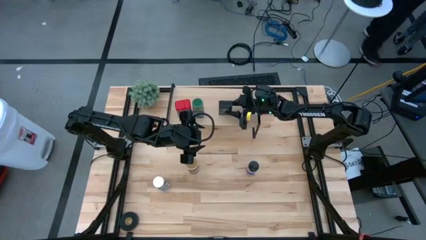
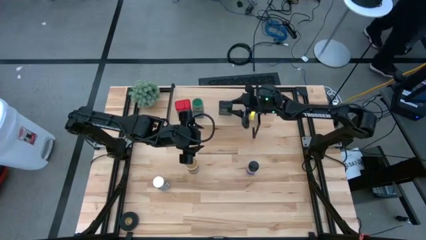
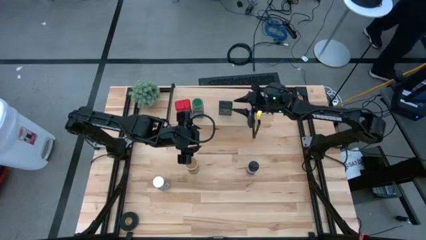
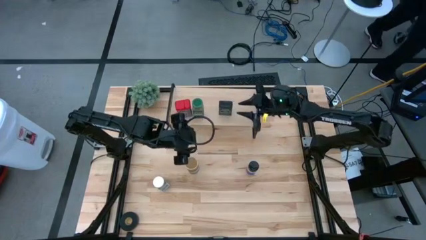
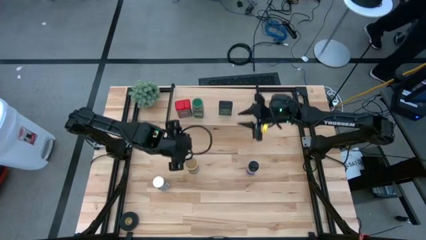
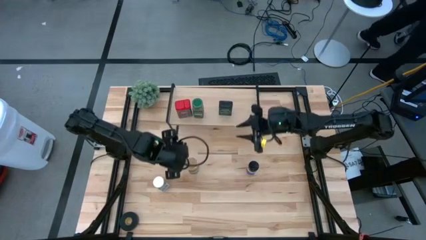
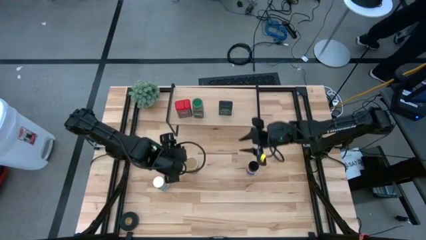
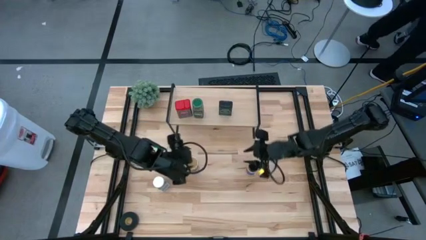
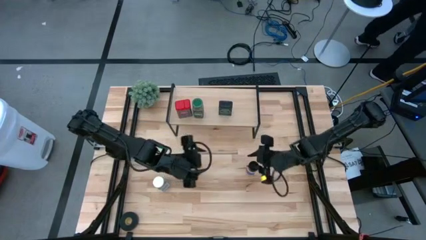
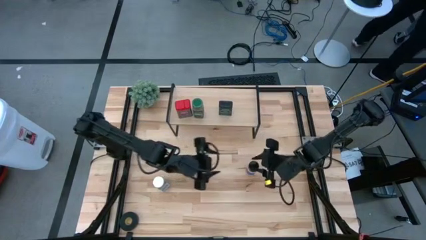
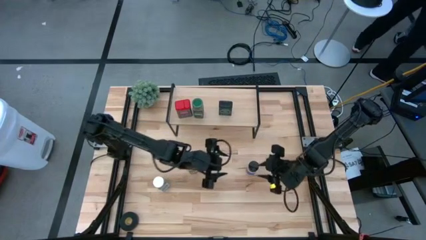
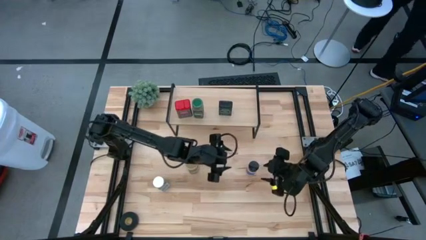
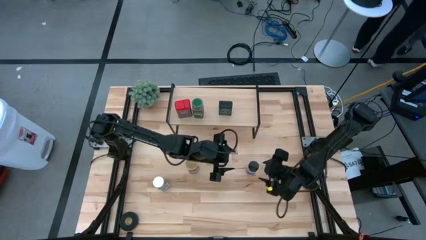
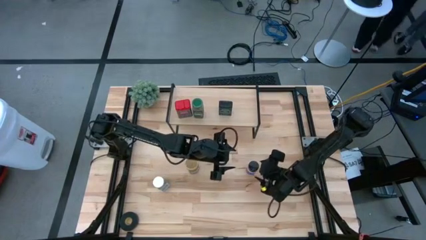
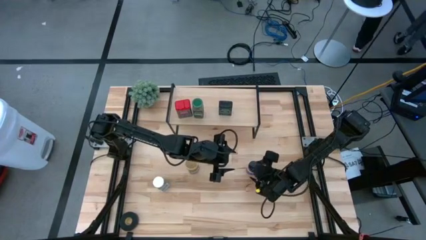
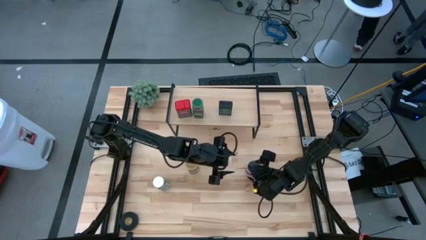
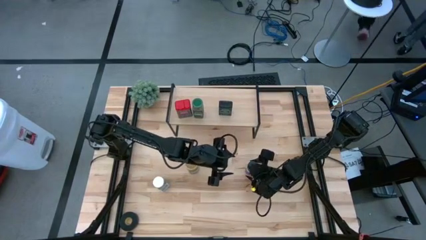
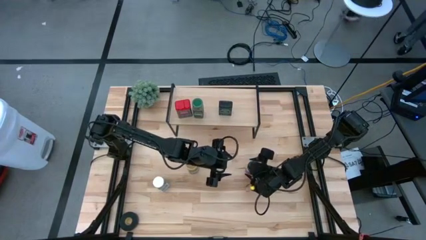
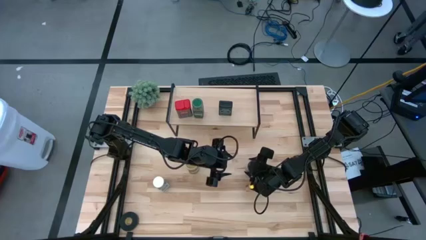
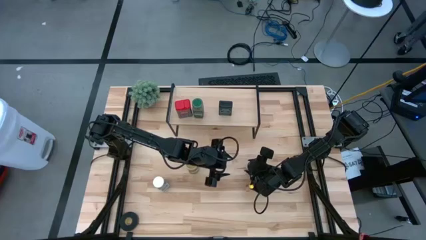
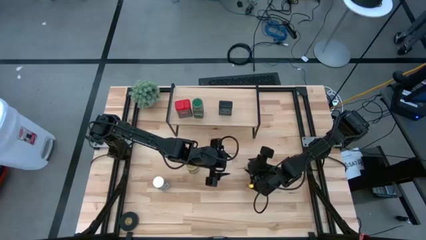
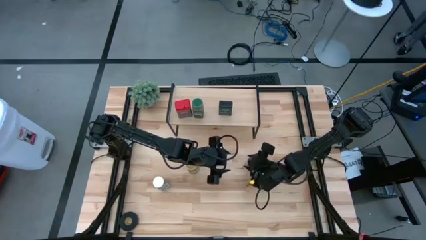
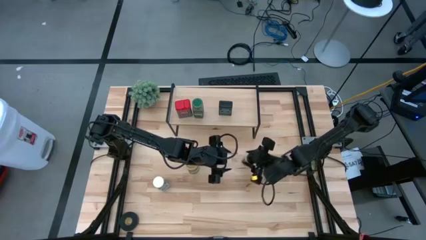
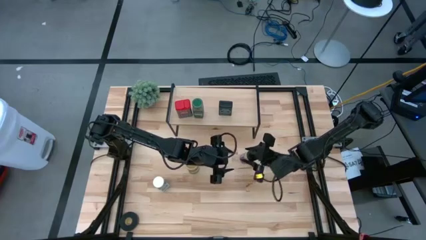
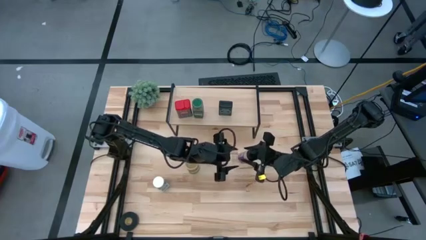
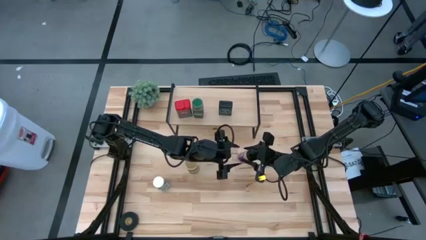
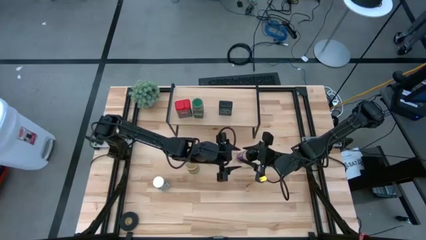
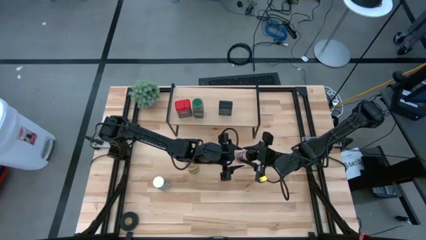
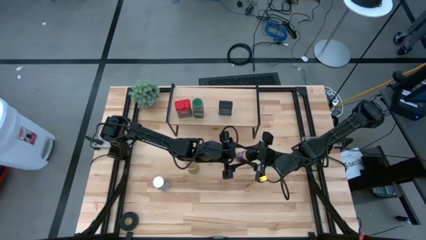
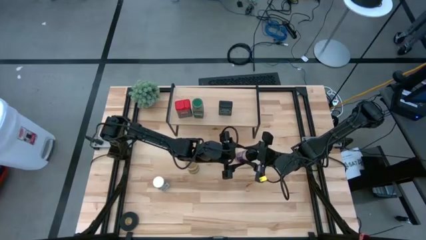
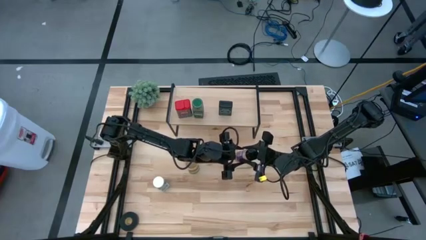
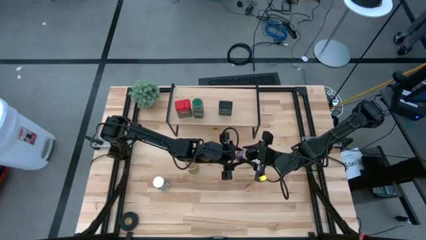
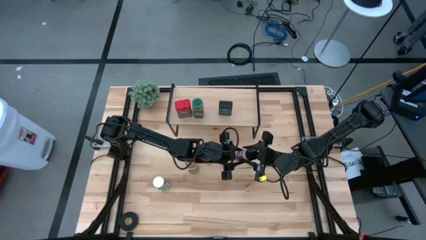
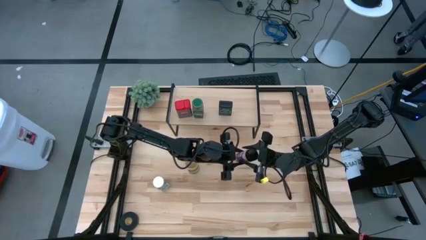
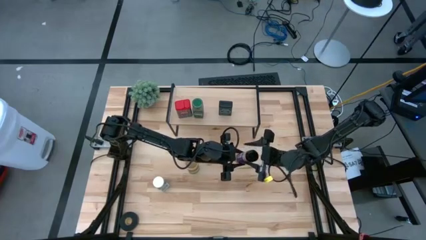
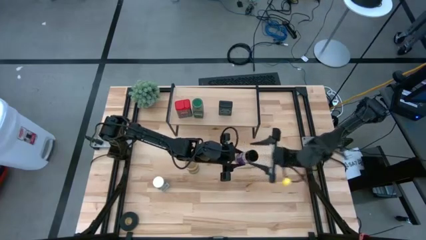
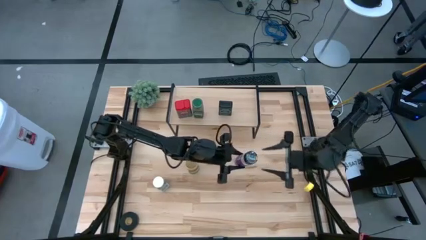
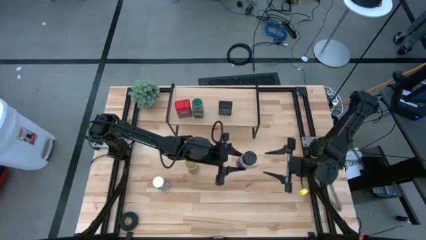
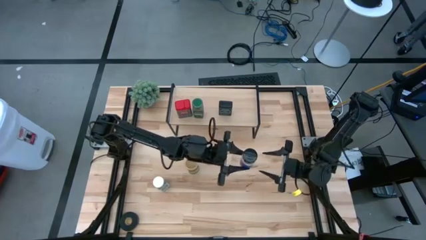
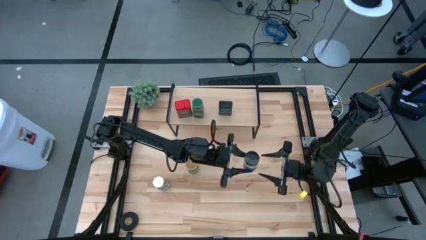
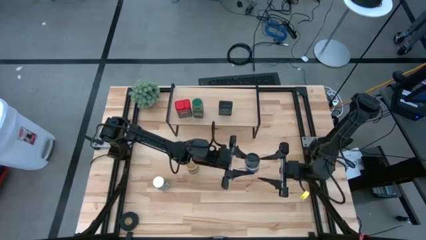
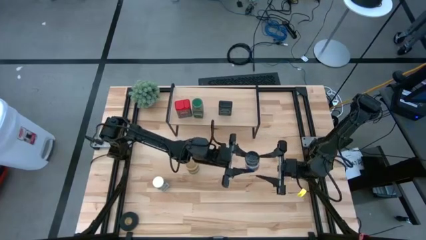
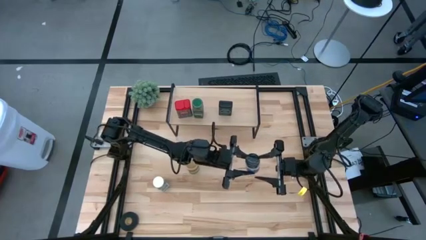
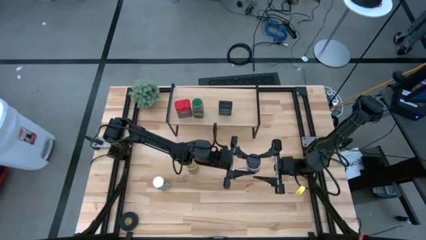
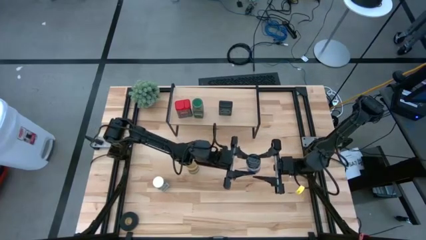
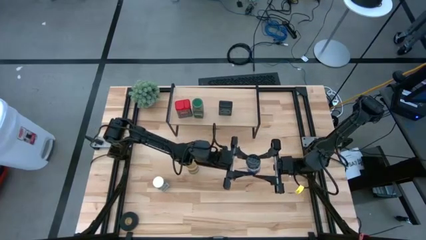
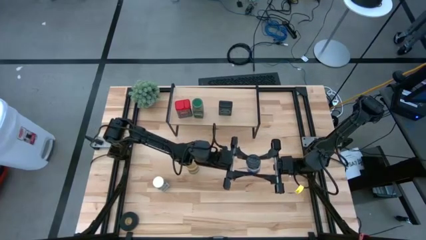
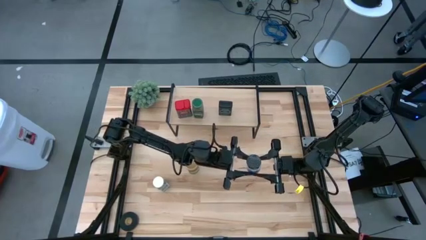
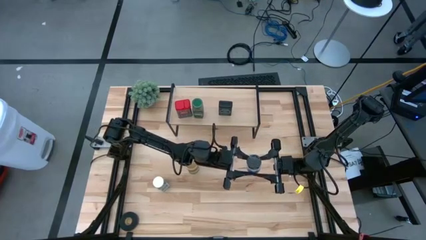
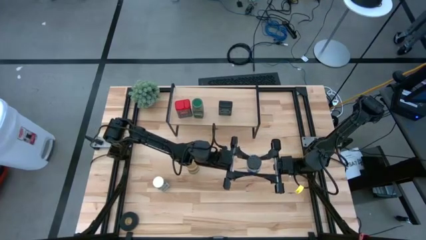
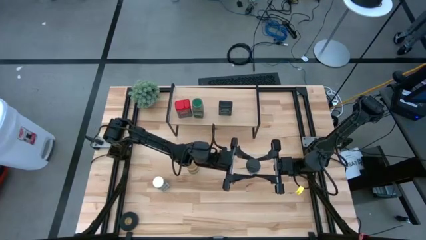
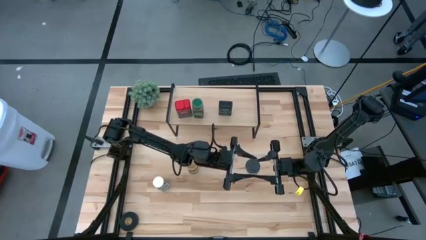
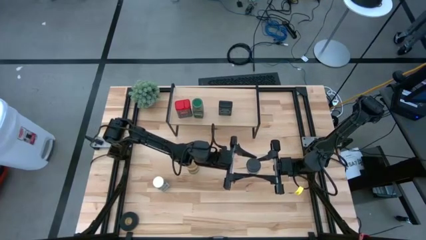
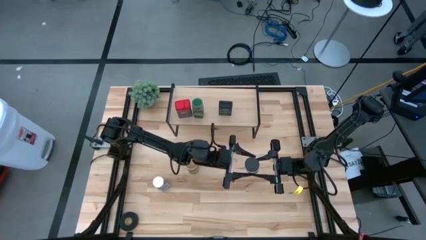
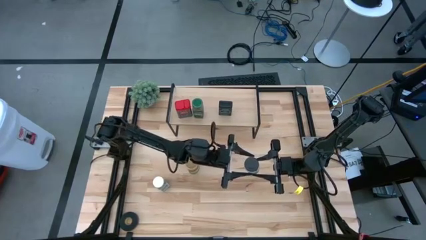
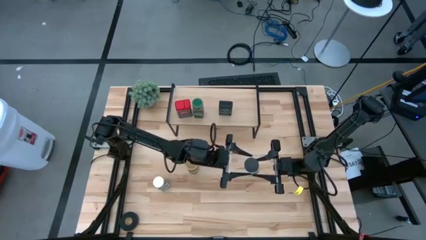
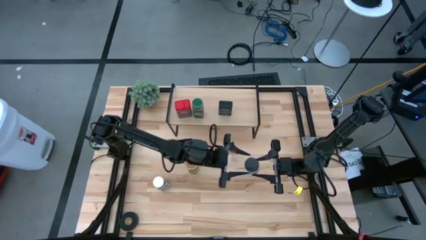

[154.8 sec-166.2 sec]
Task: Shelf spices
Put the black seasoning bottle on the shelf aligned with the other black seasoning can

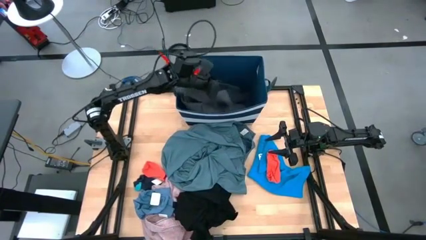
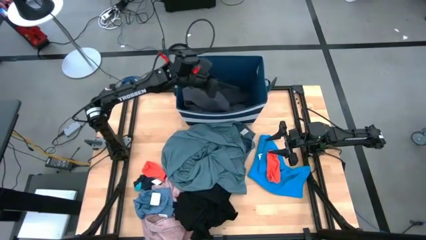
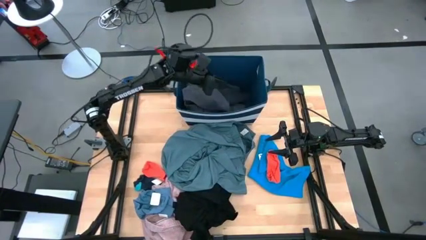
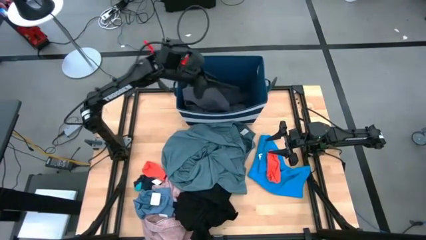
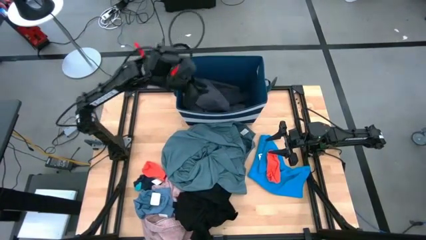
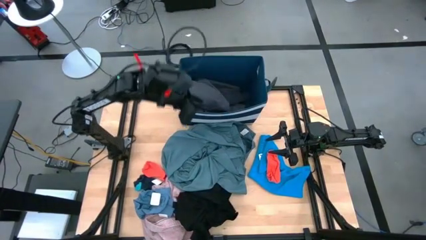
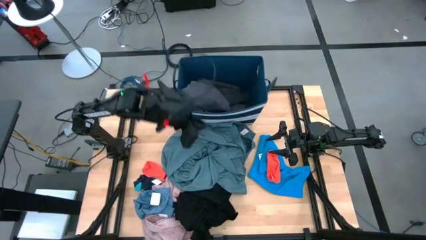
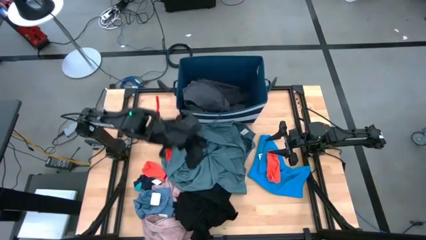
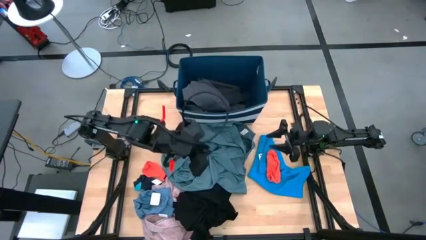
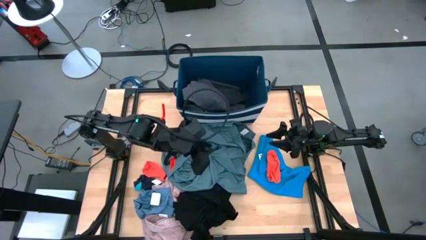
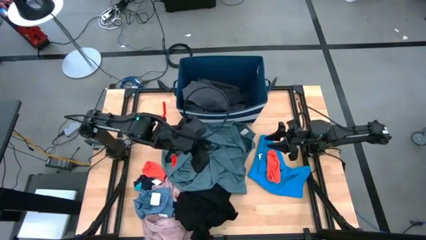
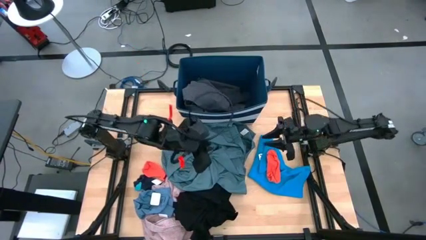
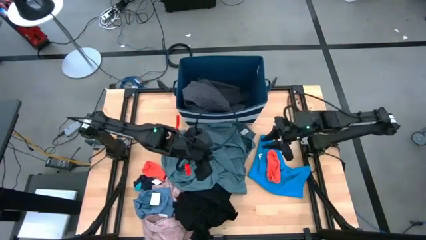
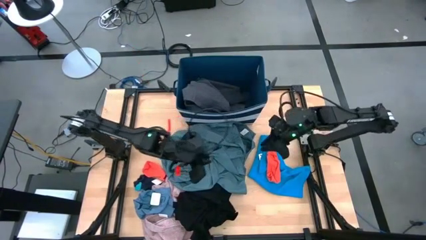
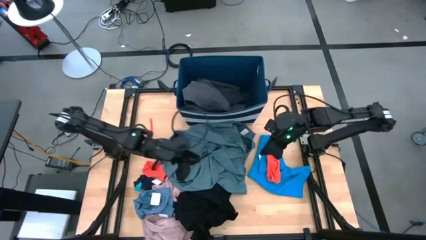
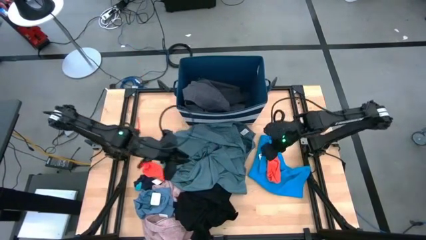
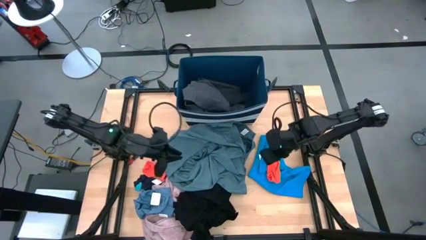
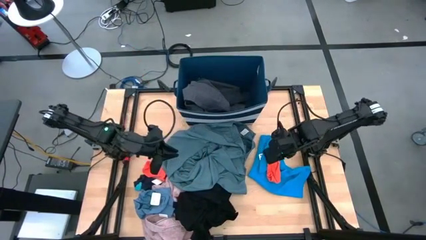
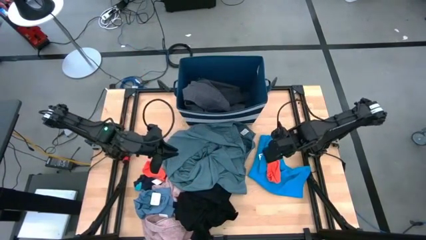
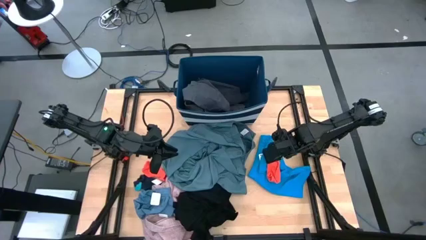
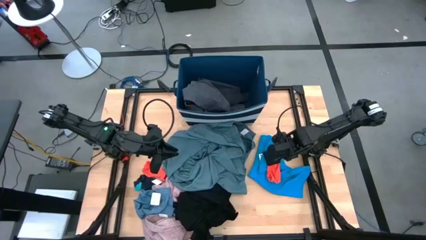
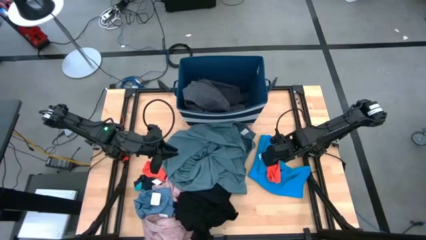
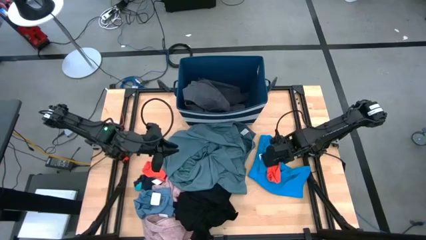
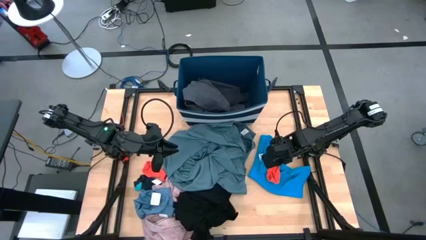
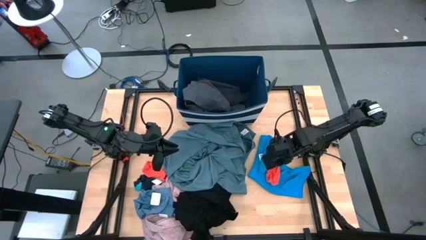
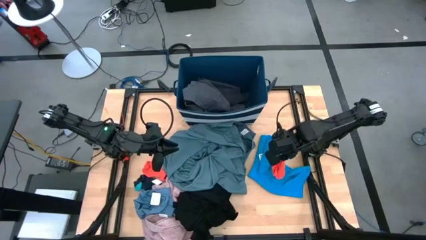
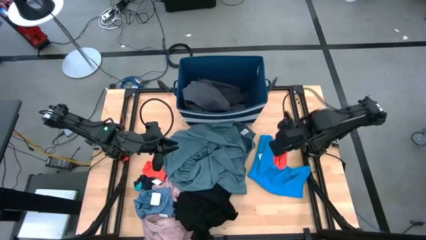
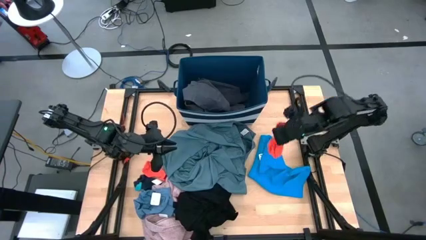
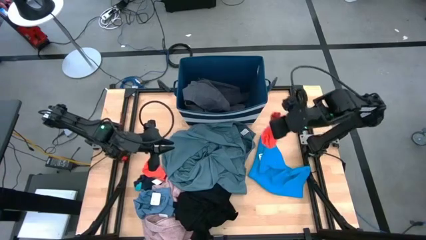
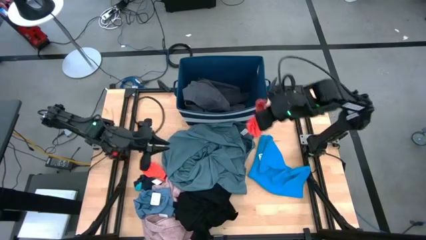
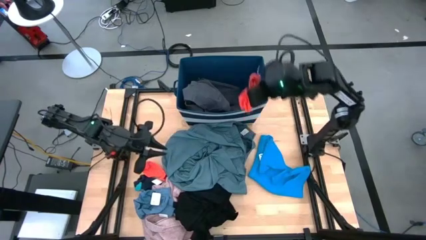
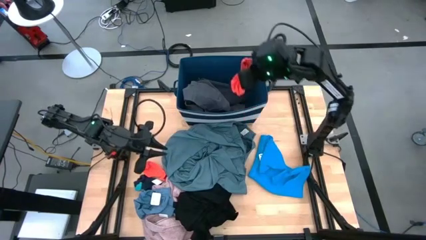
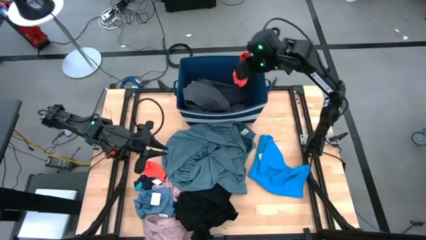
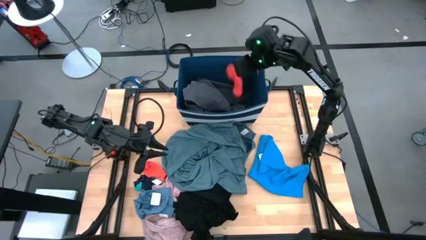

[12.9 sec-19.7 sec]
Task: Sort clothes
Put the orange sock into the blue bin
